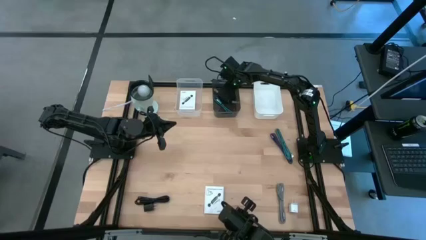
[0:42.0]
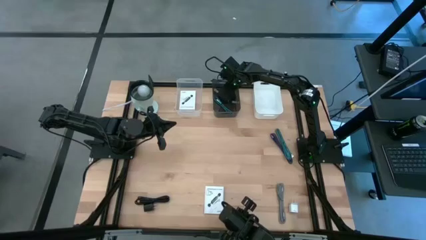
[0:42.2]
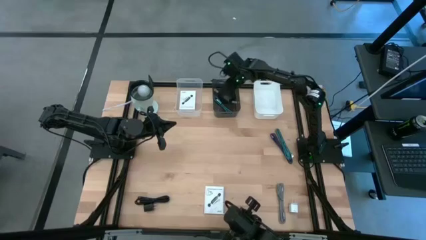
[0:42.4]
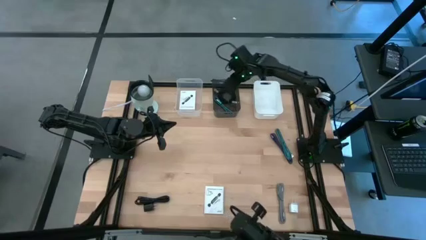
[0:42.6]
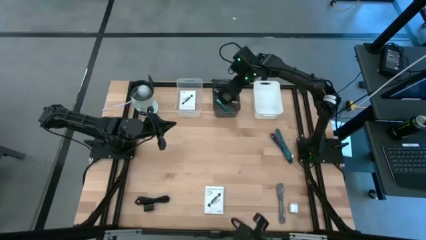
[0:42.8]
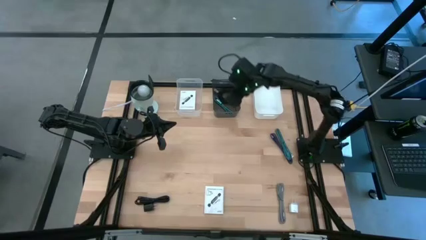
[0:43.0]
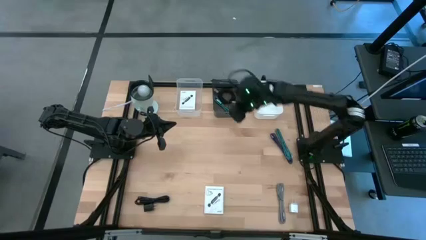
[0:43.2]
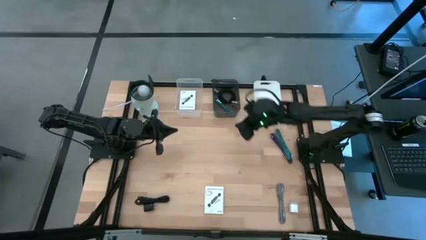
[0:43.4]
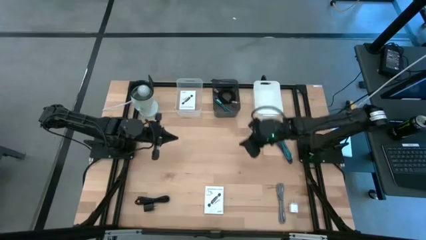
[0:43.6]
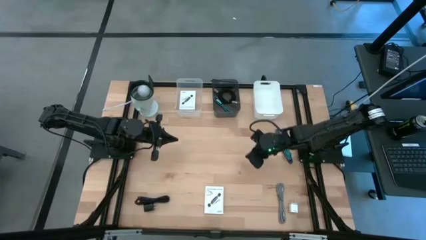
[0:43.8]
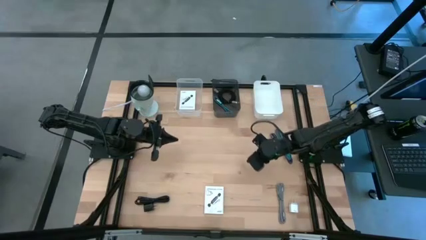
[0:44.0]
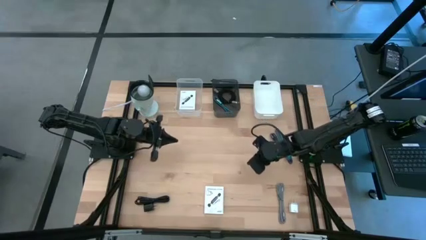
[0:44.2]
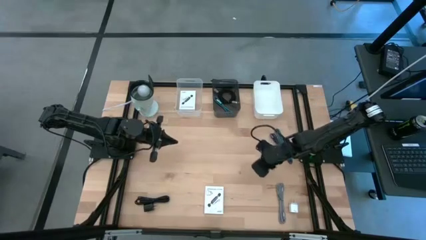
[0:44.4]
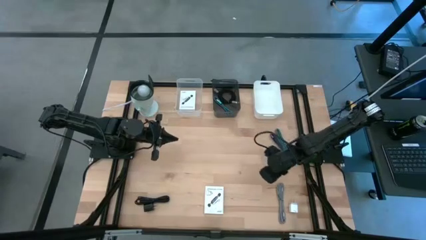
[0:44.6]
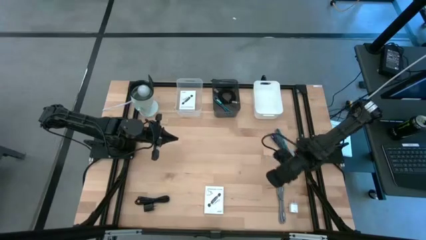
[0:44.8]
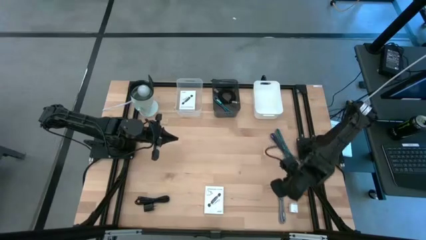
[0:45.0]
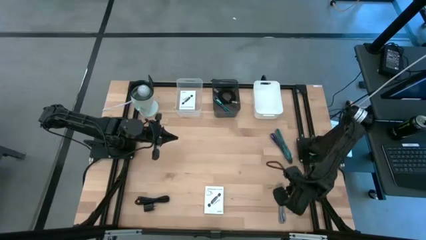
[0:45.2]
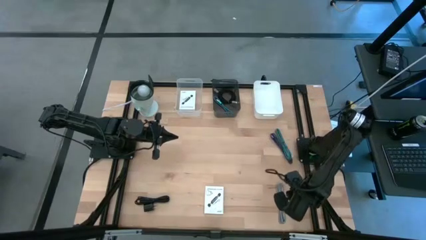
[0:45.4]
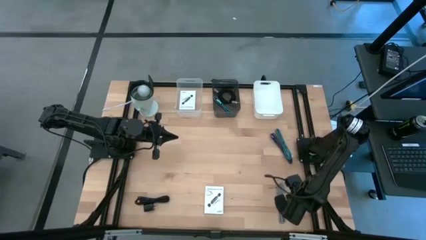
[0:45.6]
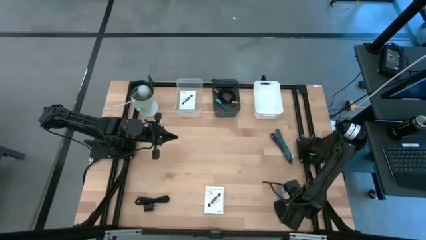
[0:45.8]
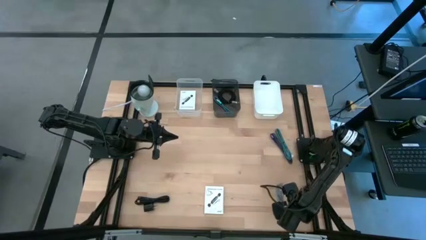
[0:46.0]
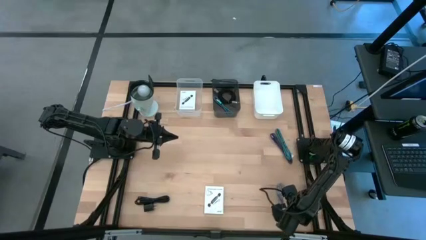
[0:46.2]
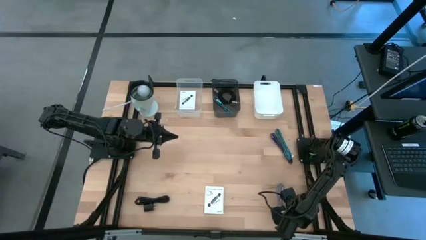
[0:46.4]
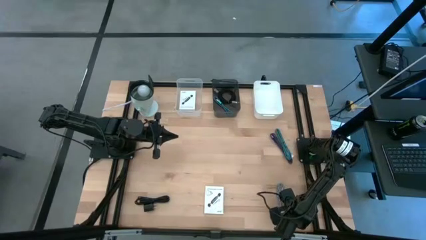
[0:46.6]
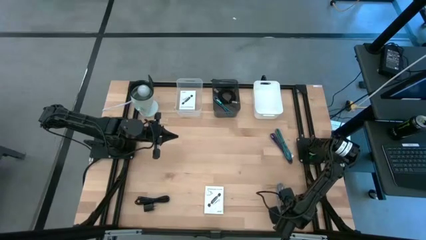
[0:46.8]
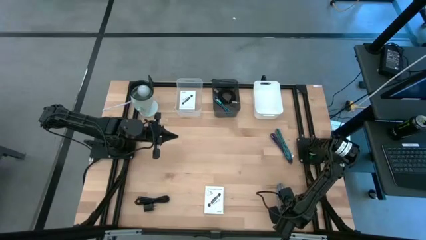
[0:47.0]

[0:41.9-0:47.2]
Task: Pick and place items into bin
Put the white charger adapter into the white bin

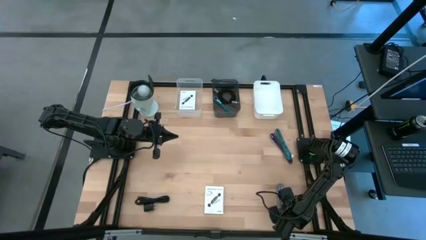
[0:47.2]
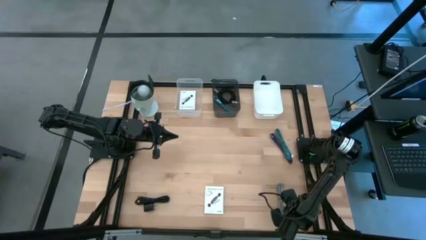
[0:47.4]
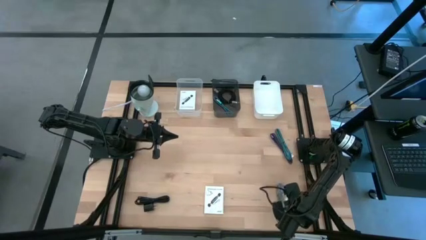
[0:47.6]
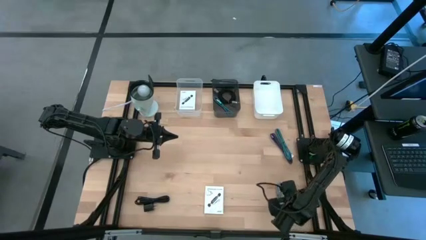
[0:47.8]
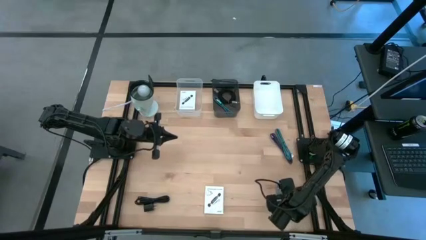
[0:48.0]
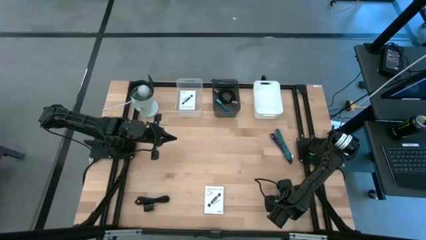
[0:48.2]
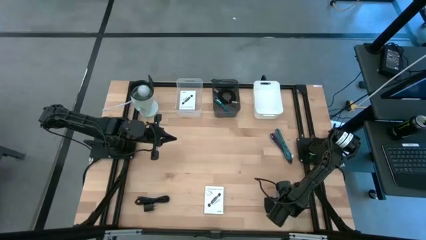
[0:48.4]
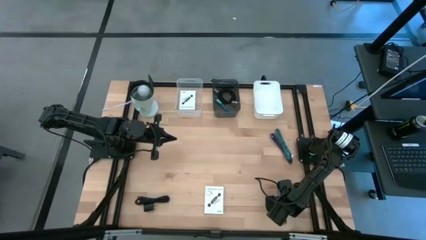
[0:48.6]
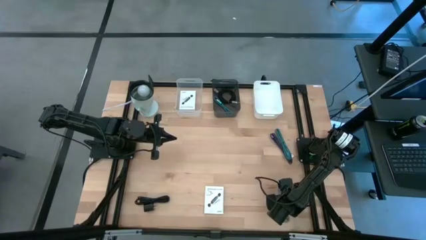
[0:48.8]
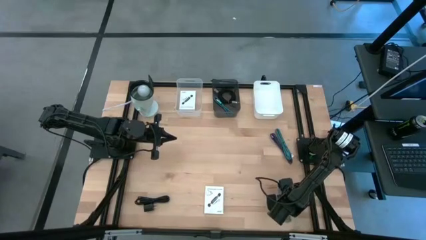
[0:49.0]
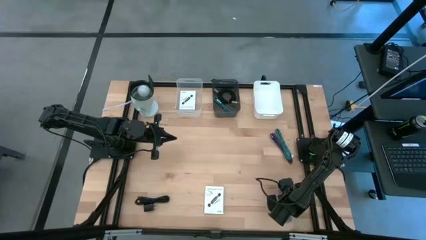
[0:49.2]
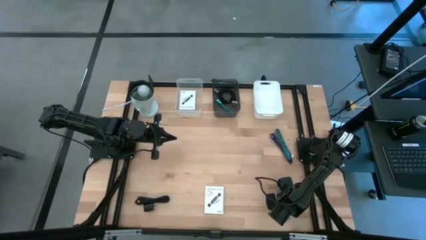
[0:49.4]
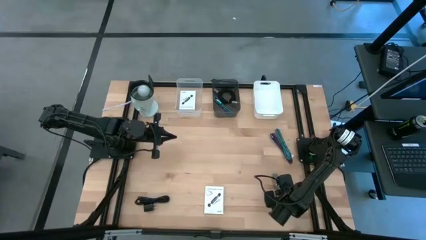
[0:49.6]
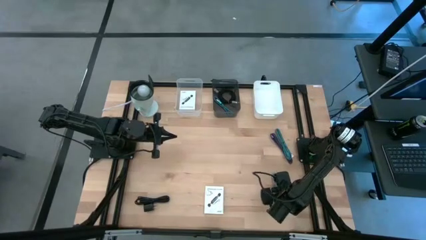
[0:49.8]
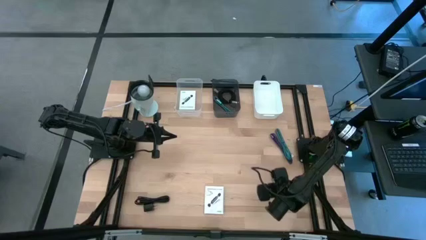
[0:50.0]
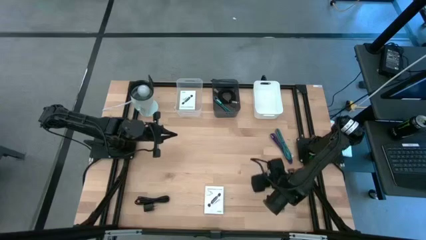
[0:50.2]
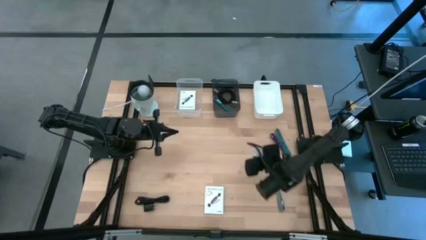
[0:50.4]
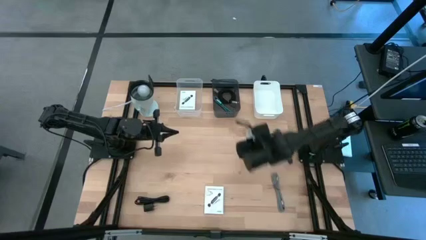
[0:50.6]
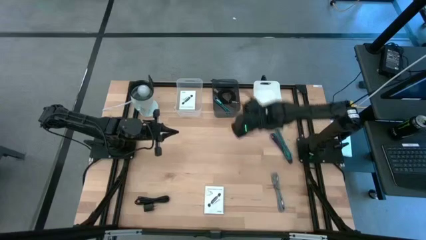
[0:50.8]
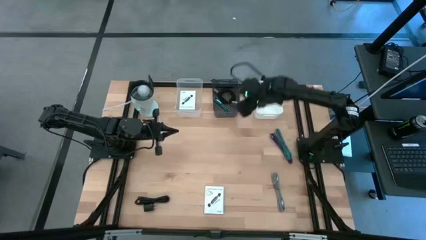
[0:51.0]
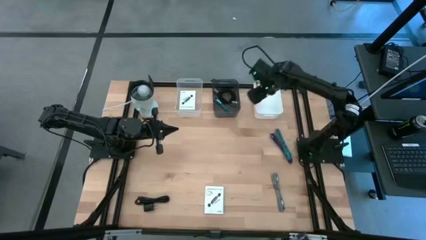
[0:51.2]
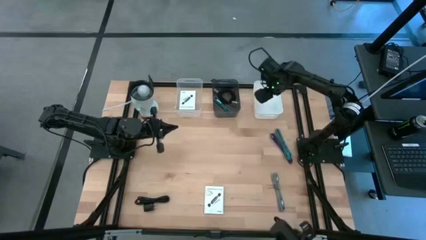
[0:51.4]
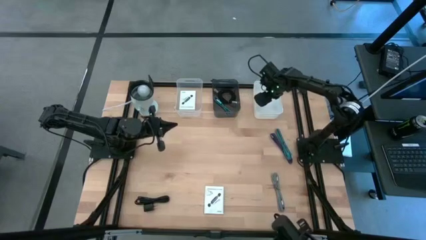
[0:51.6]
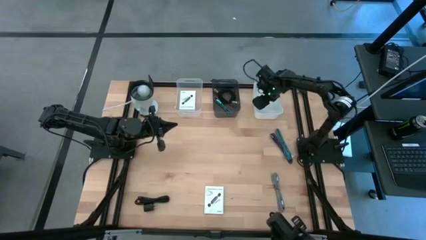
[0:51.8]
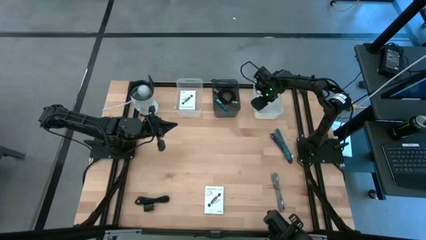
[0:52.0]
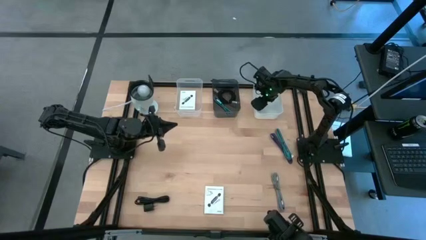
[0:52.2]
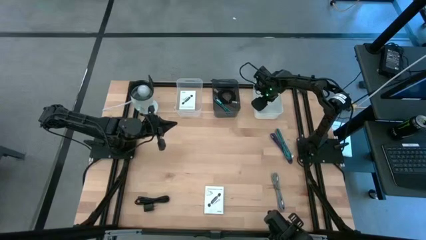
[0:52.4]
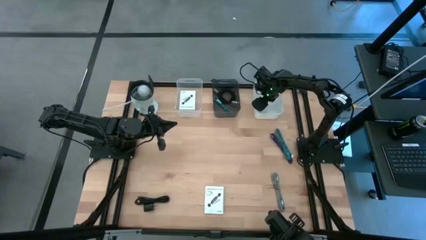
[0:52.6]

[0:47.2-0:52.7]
Put the white charger adapter into the white bin

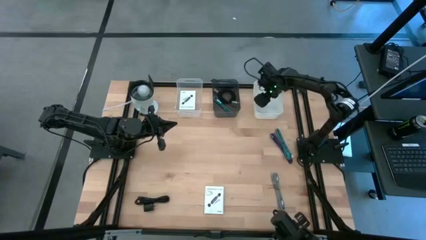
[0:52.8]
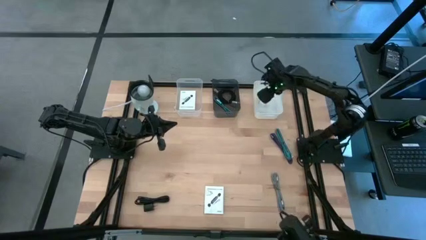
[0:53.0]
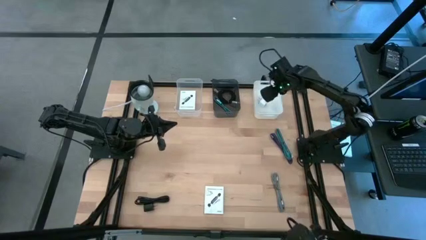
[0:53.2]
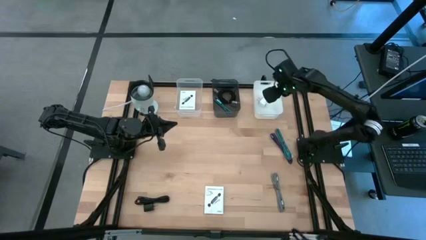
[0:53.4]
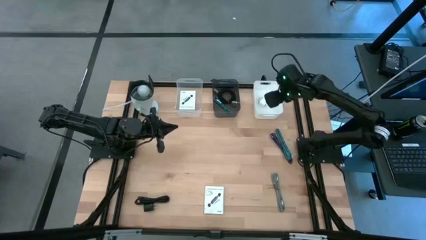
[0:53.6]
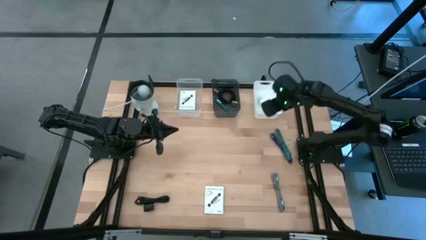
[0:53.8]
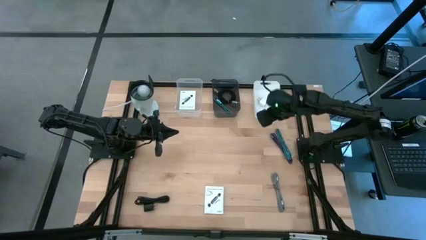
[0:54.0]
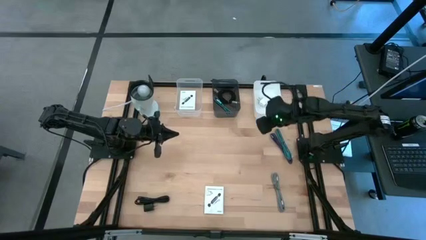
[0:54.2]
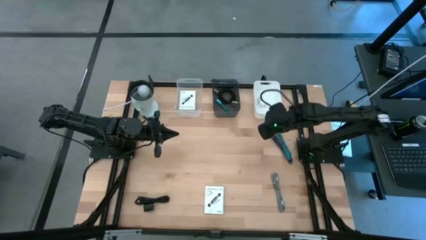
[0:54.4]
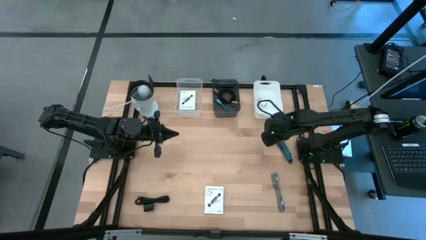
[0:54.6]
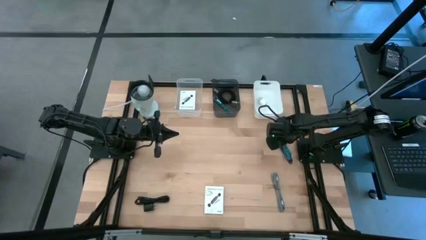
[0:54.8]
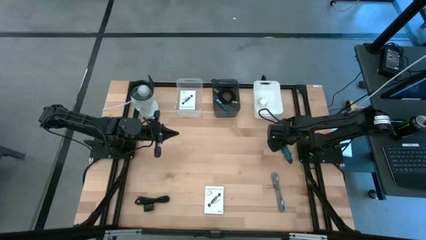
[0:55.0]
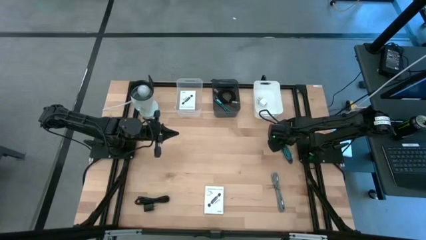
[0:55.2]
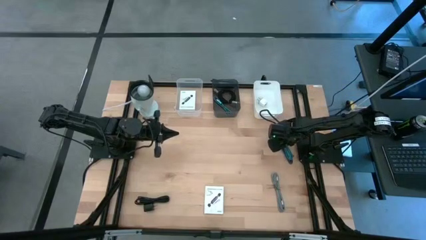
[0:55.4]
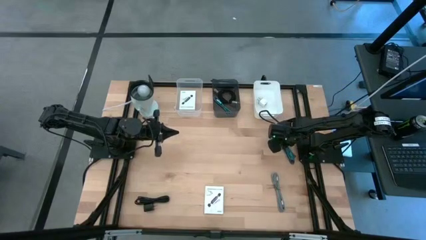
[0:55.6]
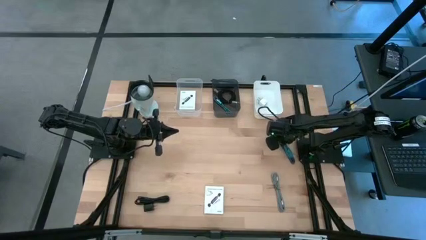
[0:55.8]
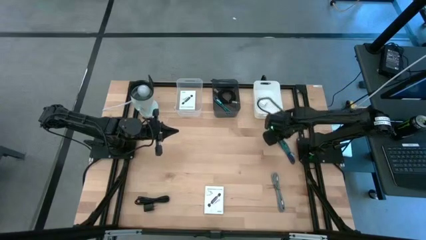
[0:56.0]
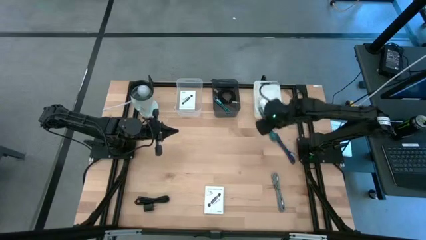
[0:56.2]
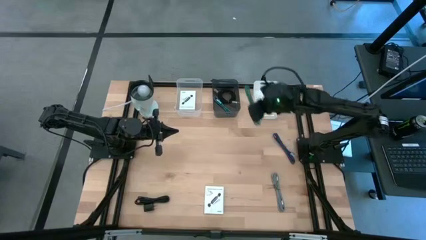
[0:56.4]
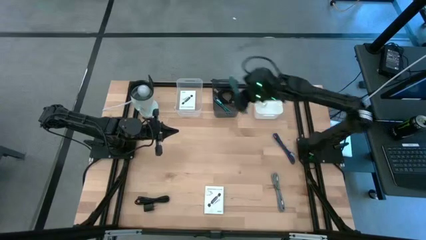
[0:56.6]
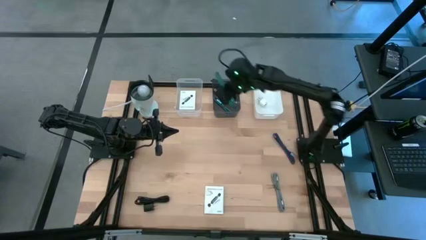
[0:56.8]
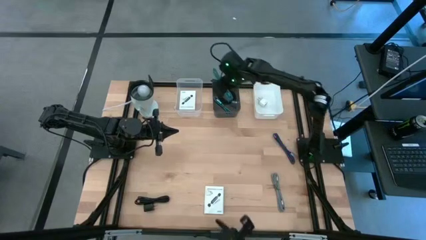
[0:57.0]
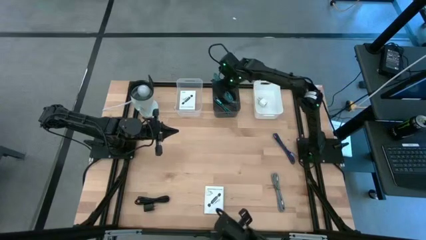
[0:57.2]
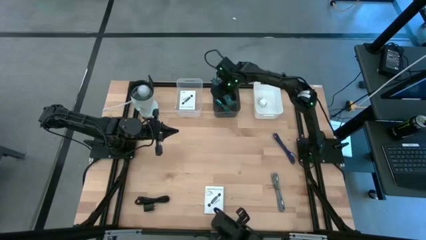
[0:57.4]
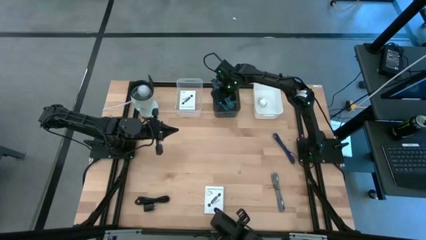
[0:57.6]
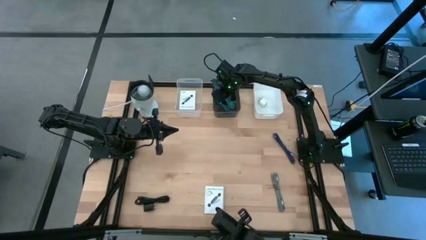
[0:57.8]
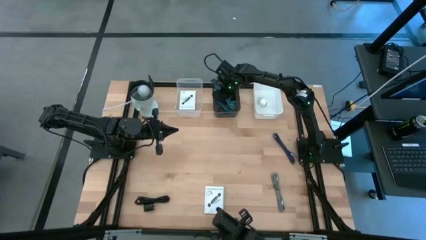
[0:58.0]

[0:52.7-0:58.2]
Put the blue charger cable into the black bin
